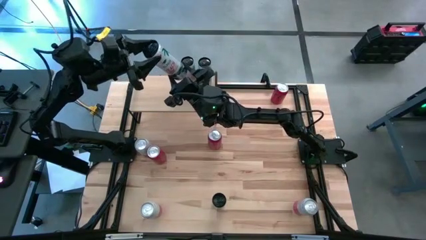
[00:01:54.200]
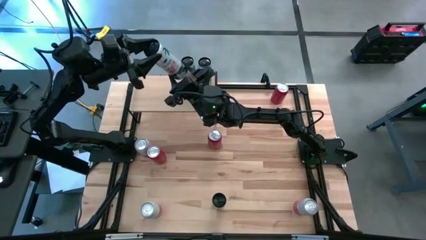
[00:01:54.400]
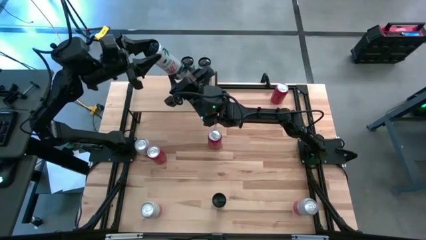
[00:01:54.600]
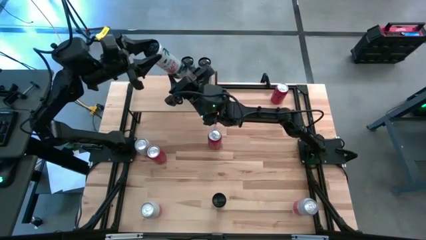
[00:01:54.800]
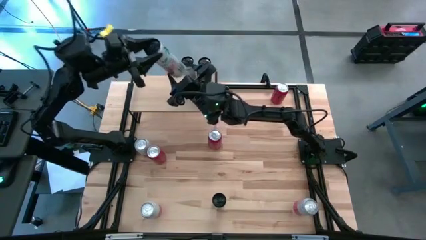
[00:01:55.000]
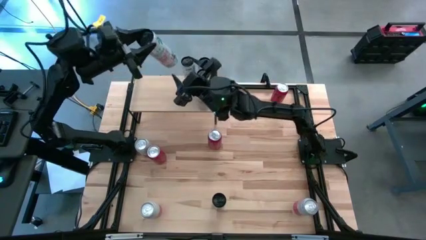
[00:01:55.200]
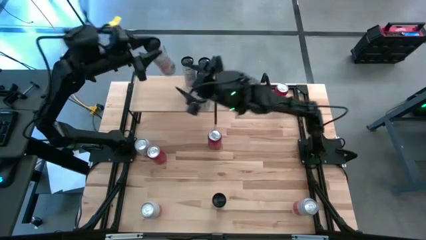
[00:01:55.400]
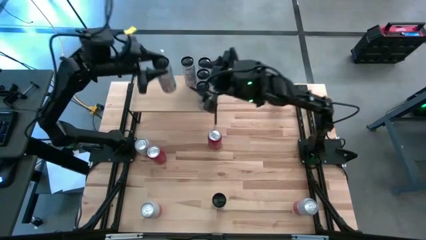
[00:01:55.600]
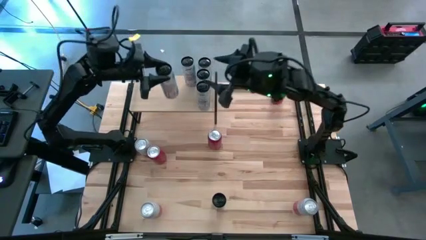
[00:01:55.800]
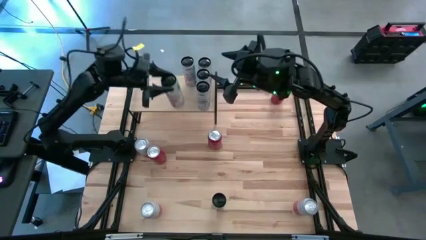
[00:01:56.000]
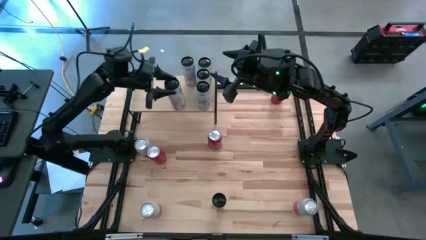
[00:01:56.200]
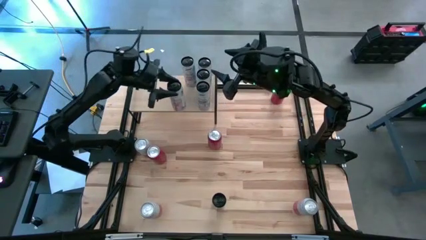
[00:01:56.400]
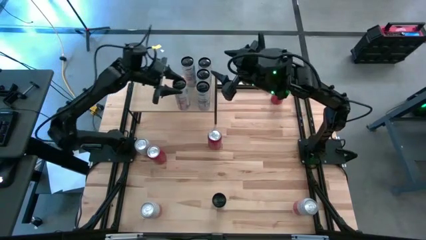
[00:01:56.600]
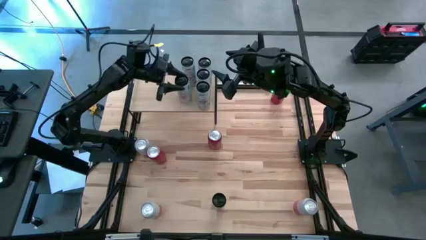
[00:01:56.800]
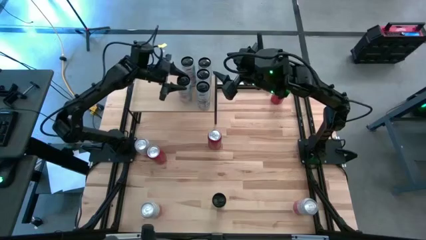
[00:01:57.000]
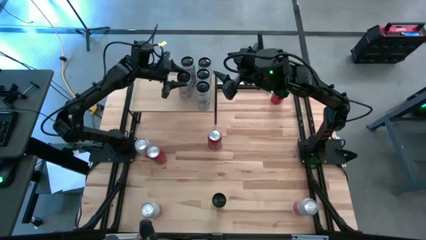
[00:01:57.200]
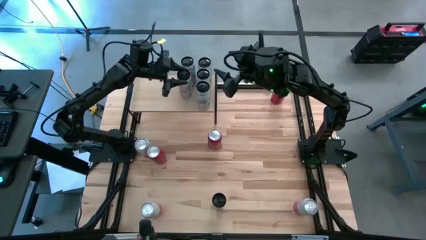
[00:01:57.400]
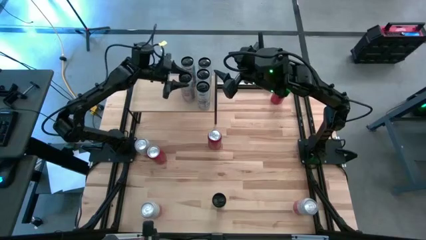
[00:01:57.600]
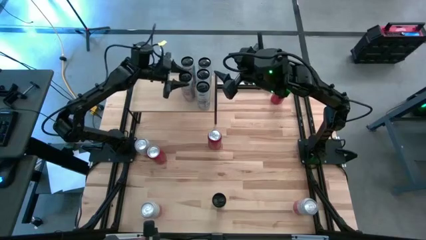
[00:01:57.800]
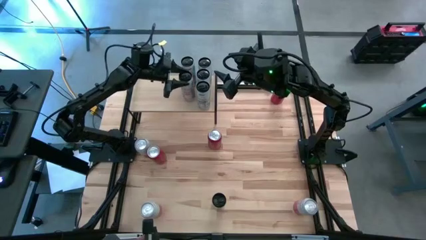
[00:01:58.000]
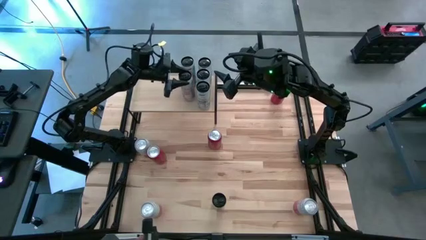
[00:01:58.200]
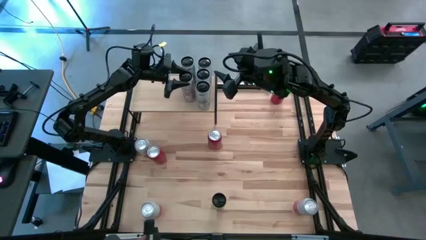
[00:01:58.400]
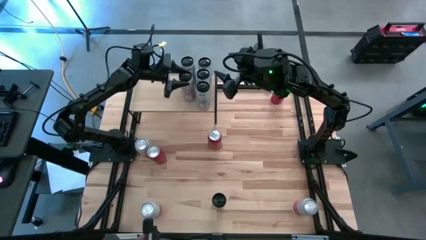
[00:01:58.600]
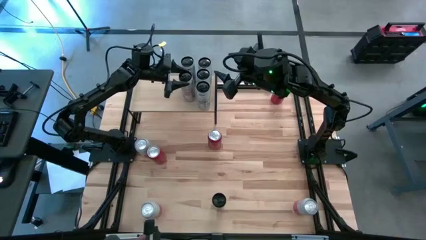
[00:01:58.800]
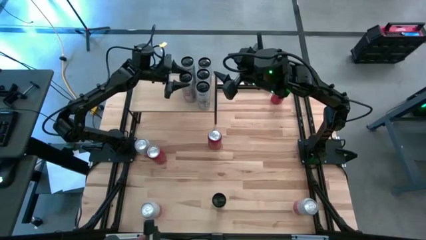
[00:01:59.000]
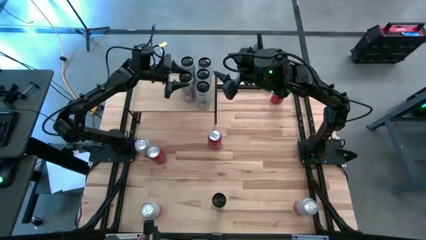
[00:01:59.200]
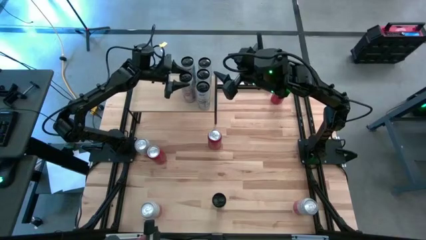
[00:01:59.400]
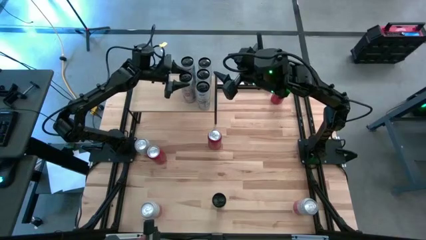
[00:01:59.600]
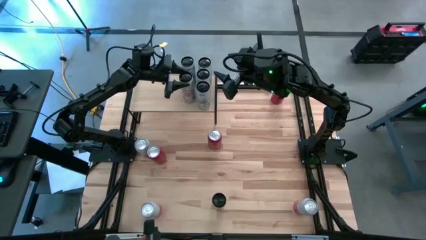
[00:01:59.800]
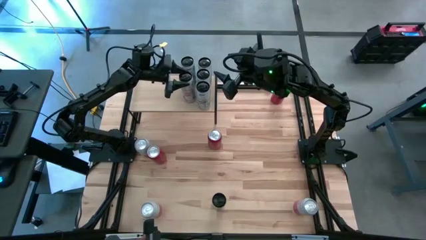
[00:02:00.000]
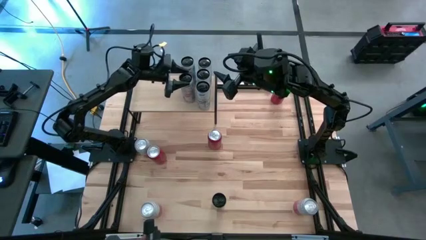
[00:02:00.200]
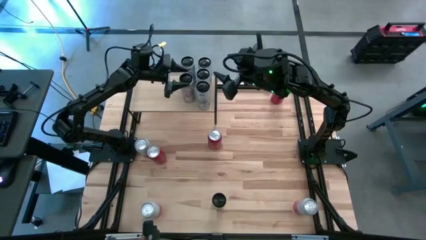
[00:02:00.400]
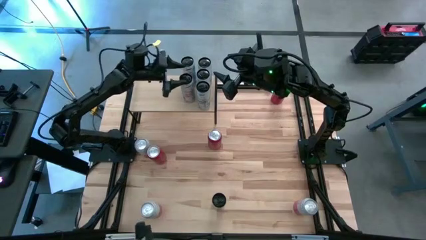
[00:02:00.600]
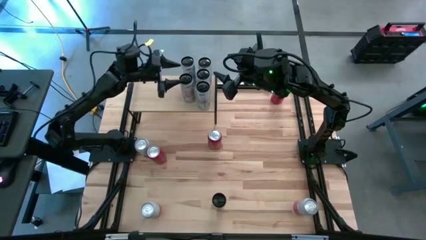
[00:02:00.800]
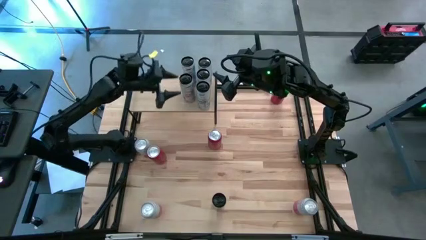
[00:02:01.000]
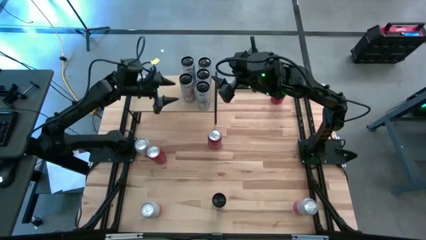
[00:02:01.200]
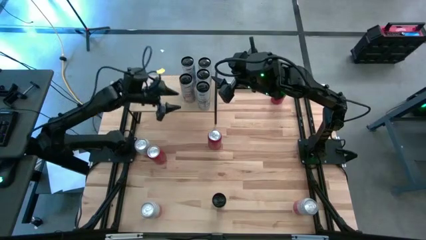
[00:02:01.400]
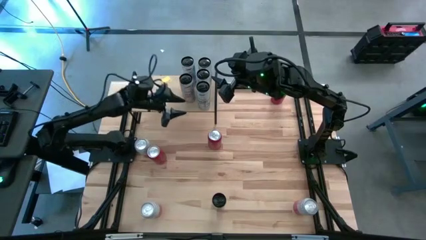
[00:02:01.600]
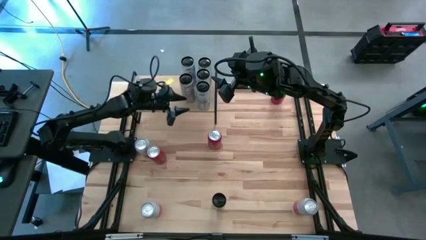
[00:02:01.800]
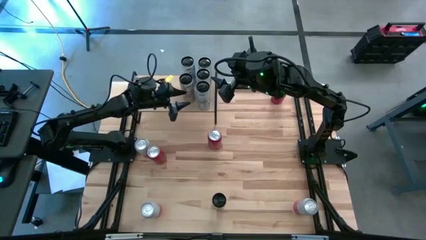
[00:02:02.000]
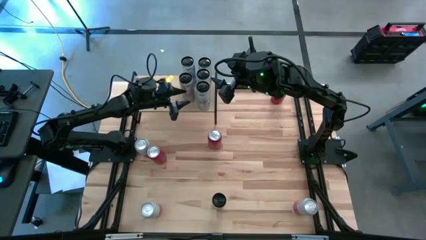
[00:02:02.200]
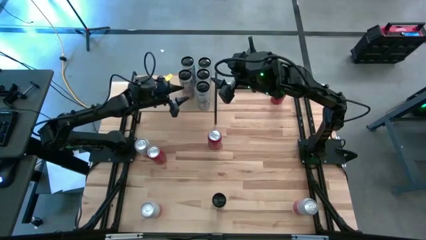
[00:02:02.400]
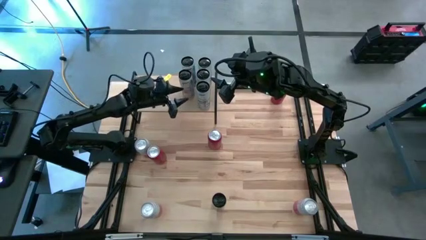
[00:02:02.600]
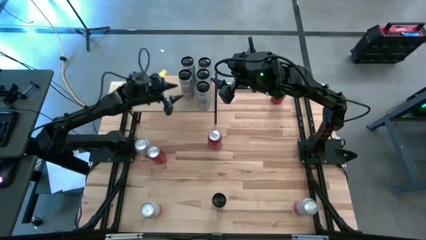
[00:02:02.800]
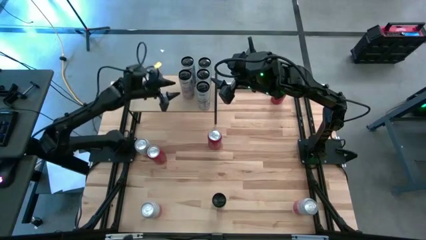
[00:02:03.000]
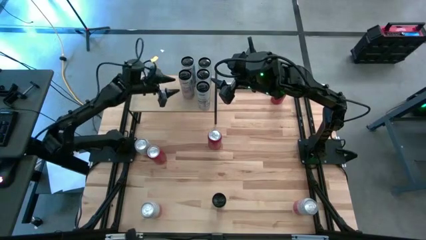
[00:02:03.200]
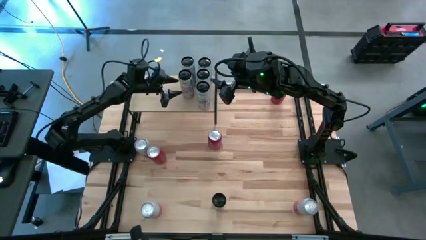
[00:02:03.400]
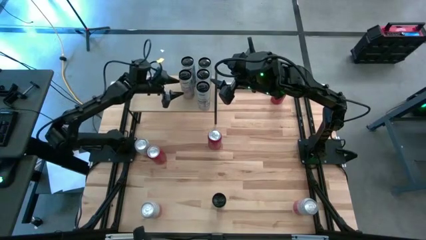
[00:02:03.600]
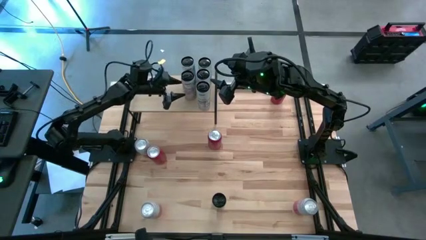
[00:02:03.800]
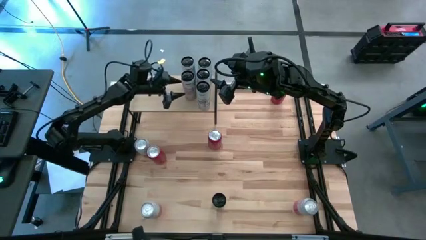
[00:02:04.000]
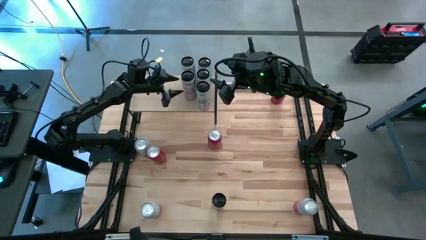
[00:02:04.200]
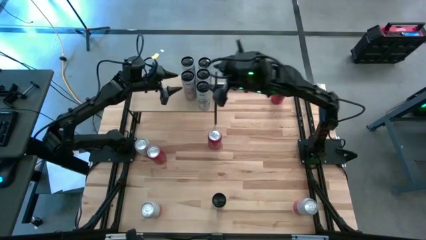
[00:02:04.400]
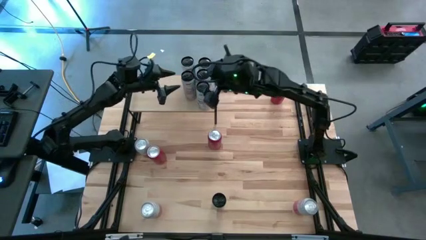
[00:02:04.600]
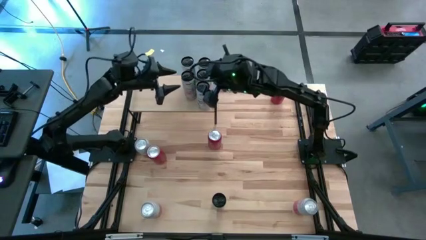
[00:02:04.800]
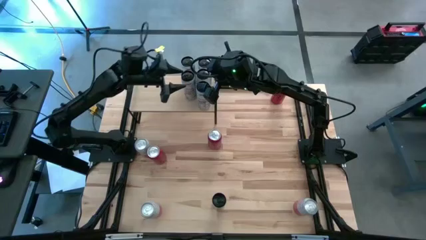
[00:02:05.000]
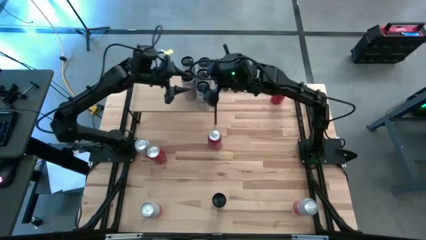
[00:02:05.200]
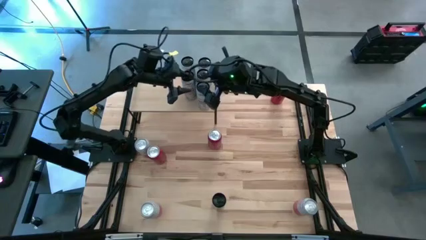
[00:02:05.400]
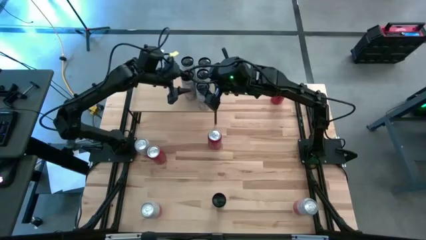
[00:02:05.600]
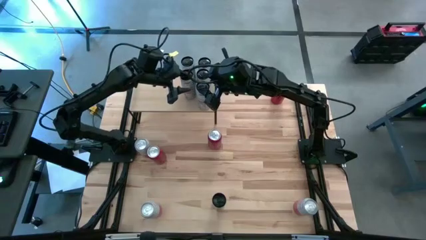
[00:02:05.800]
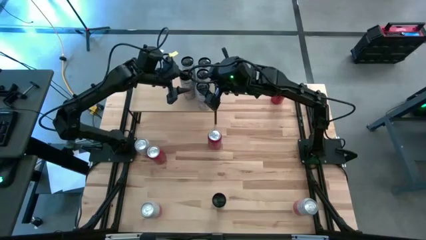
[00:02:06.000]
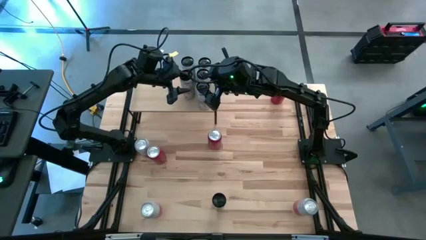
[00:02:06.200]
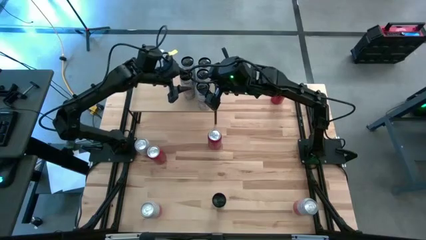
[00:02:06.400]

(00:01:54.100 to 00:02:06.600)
Task: Place canned beverage on shelf
Put the left pink soda can on the shelf aligned with the other pink soda can
